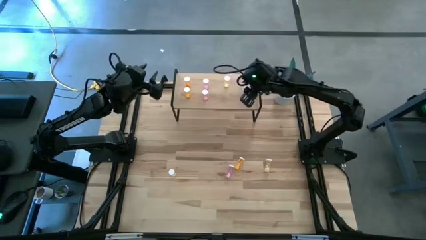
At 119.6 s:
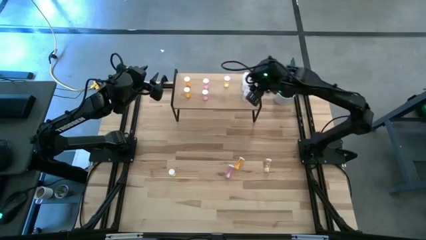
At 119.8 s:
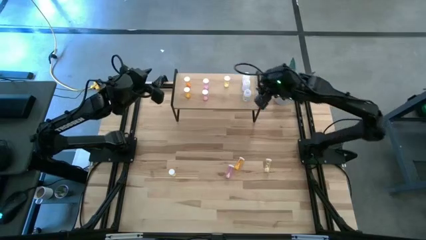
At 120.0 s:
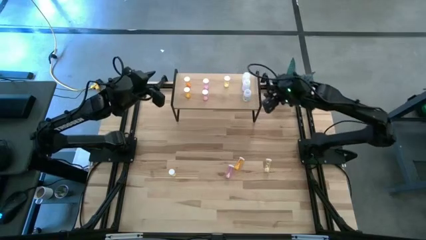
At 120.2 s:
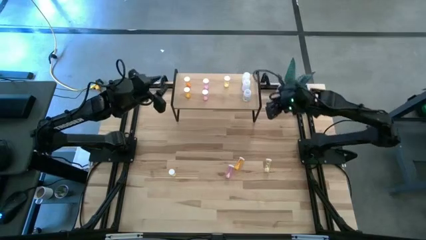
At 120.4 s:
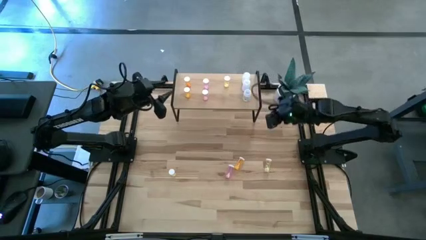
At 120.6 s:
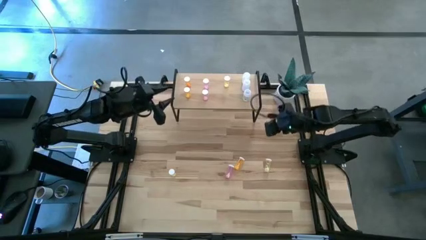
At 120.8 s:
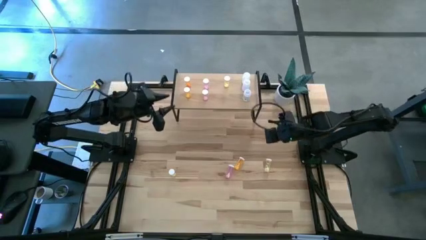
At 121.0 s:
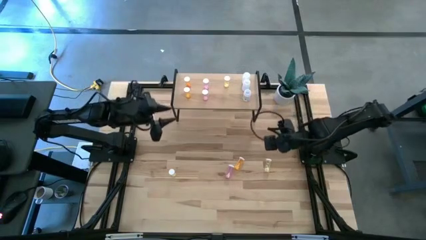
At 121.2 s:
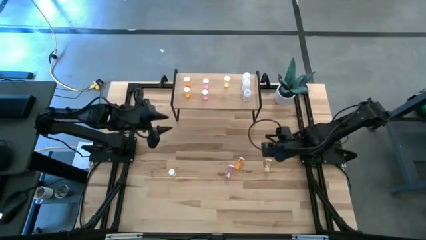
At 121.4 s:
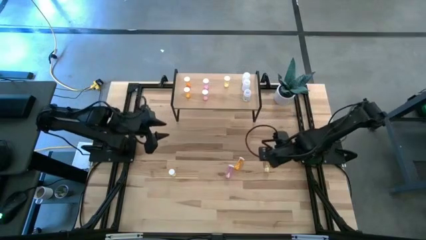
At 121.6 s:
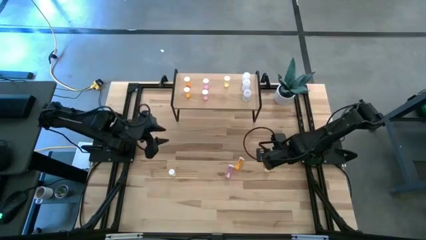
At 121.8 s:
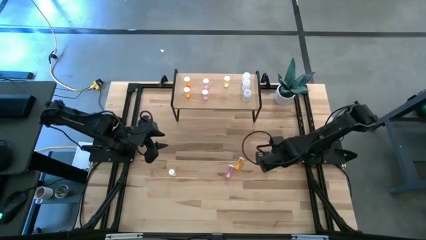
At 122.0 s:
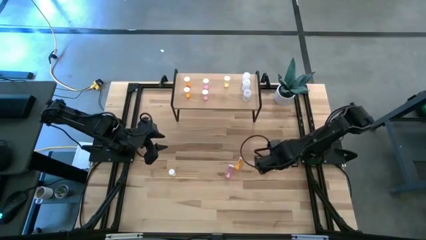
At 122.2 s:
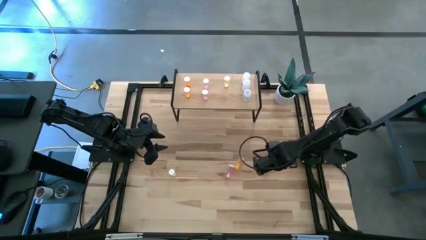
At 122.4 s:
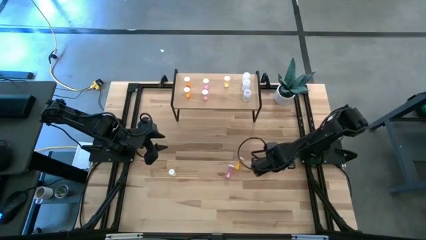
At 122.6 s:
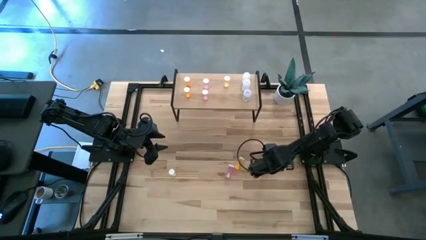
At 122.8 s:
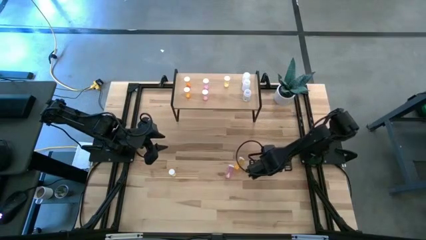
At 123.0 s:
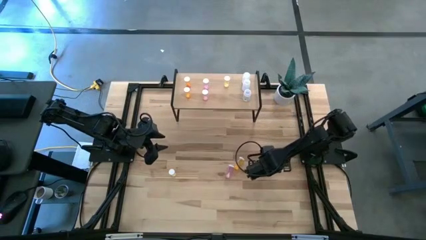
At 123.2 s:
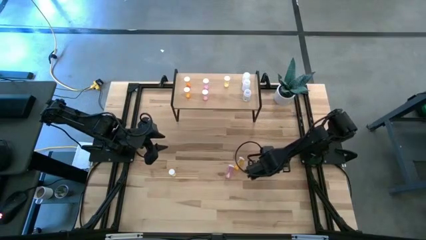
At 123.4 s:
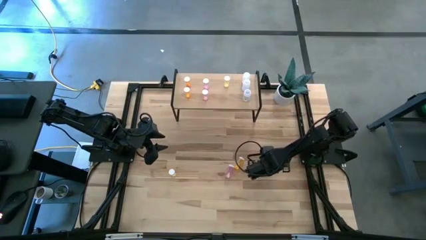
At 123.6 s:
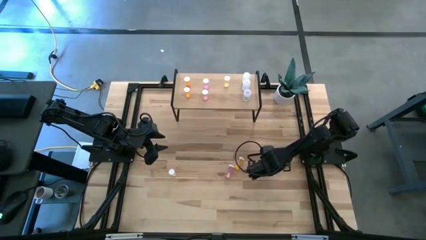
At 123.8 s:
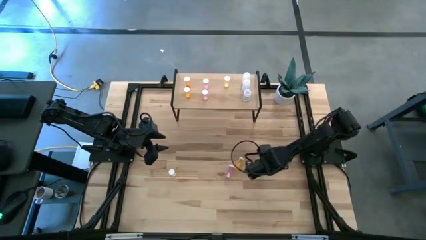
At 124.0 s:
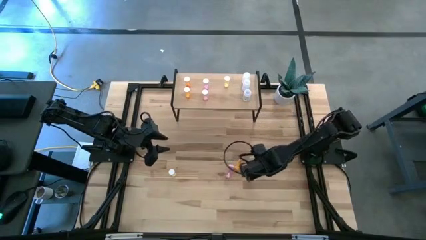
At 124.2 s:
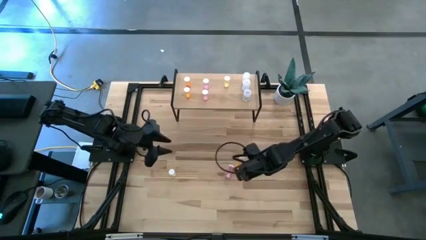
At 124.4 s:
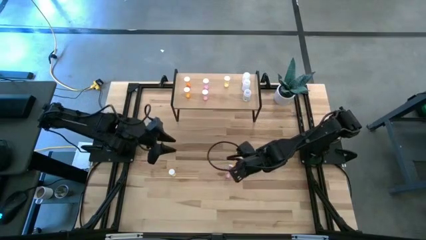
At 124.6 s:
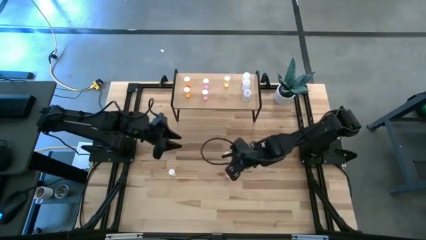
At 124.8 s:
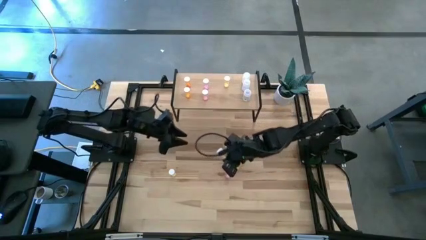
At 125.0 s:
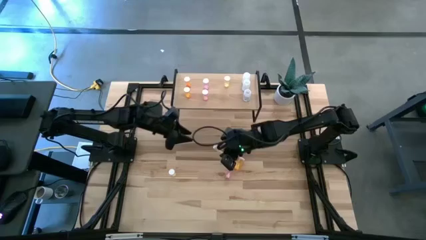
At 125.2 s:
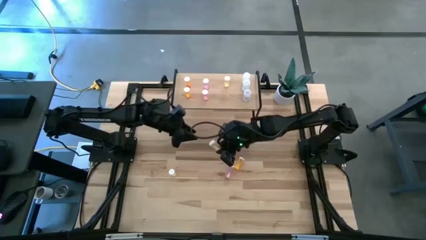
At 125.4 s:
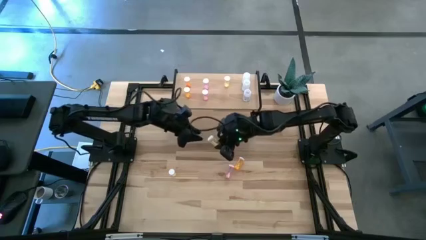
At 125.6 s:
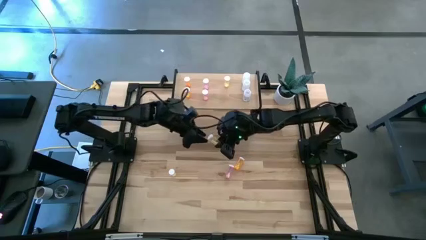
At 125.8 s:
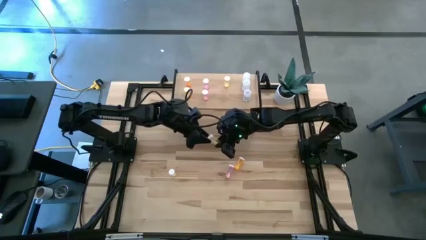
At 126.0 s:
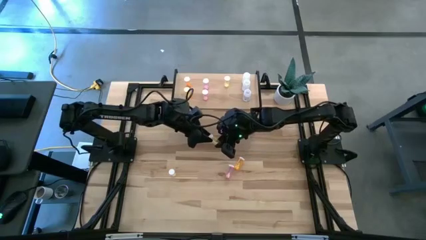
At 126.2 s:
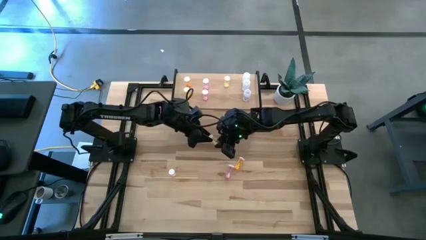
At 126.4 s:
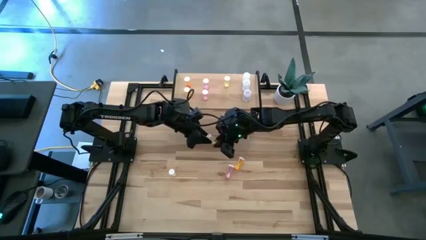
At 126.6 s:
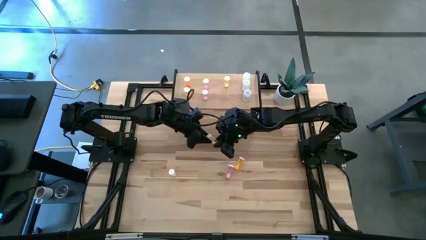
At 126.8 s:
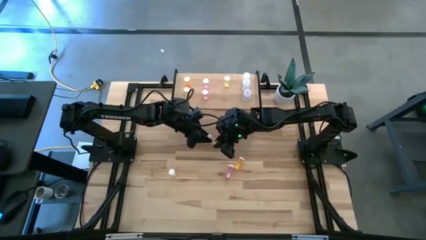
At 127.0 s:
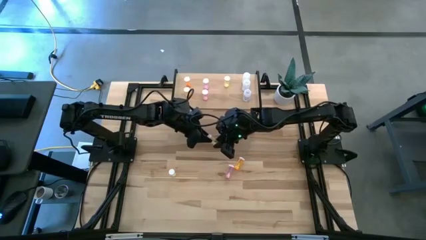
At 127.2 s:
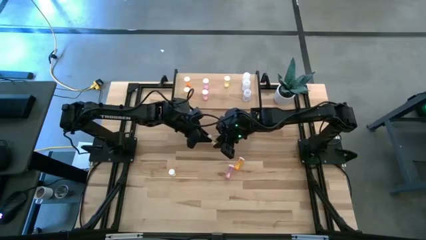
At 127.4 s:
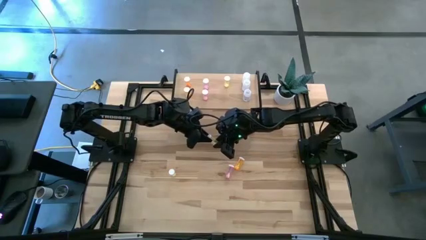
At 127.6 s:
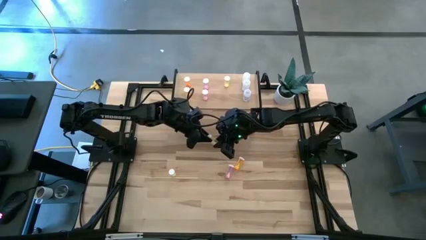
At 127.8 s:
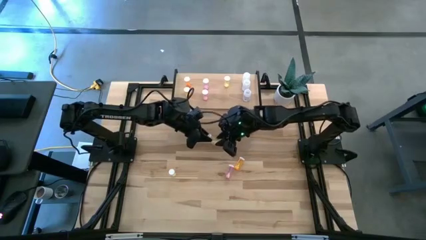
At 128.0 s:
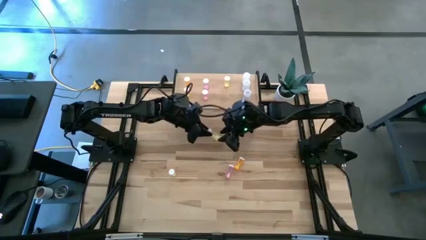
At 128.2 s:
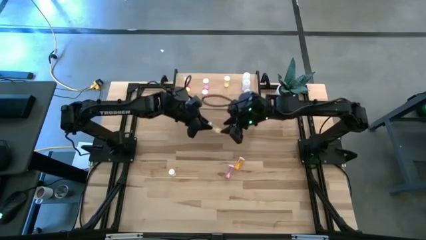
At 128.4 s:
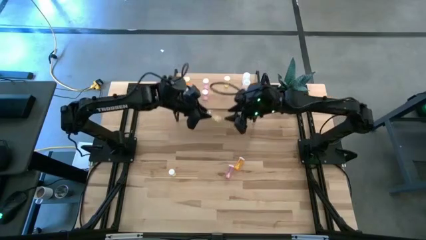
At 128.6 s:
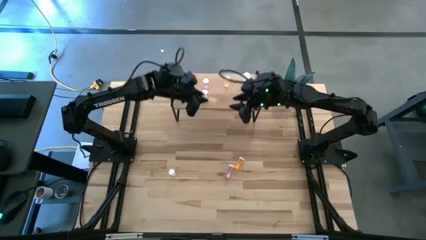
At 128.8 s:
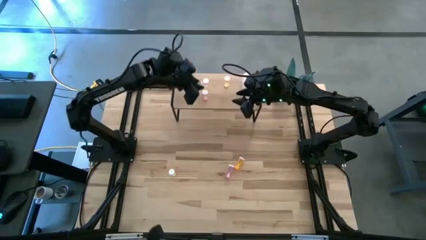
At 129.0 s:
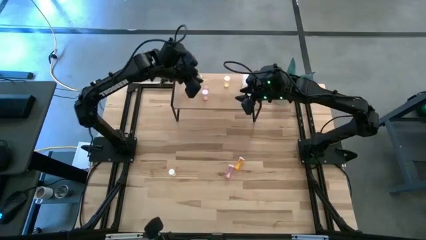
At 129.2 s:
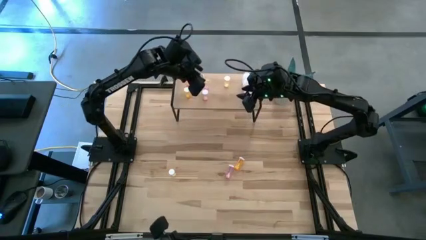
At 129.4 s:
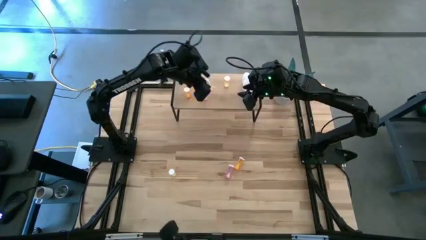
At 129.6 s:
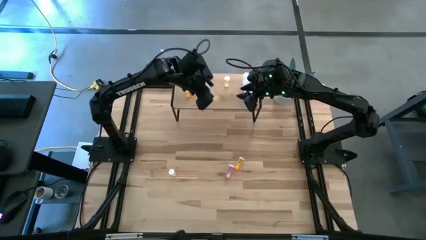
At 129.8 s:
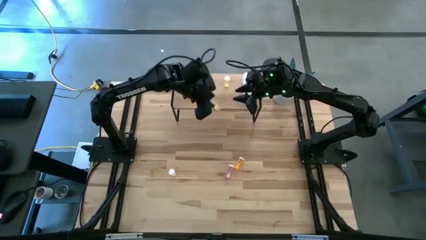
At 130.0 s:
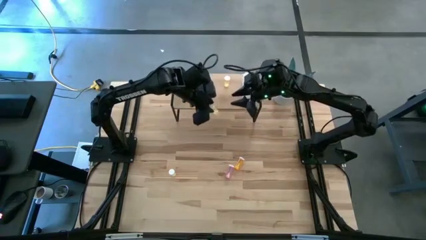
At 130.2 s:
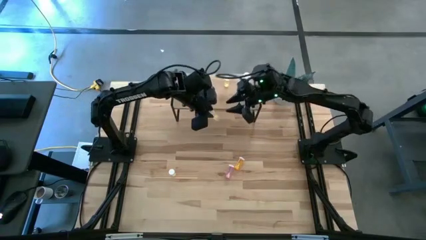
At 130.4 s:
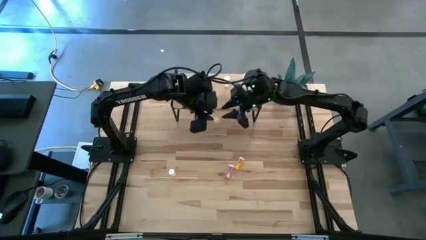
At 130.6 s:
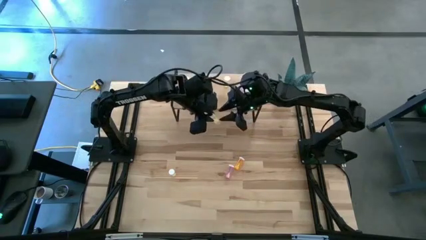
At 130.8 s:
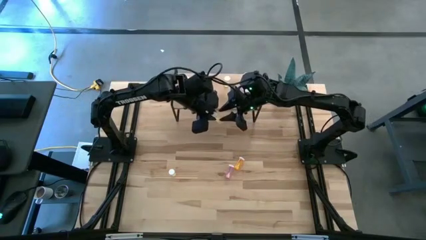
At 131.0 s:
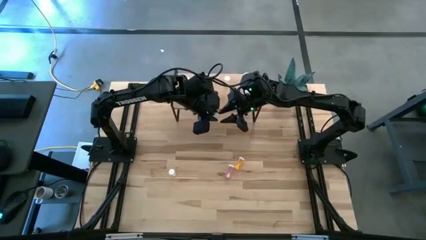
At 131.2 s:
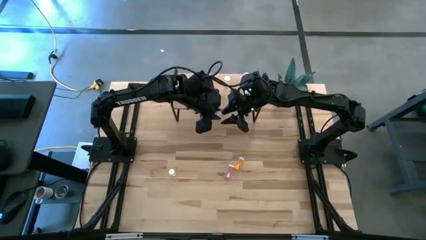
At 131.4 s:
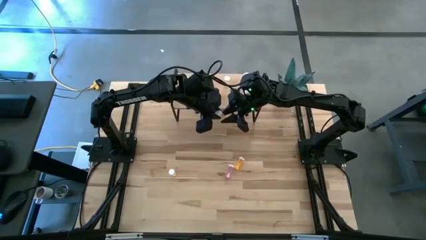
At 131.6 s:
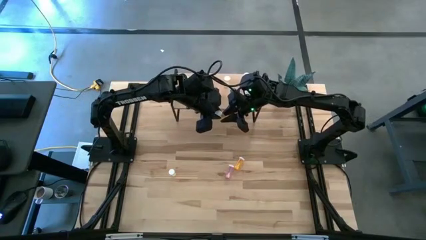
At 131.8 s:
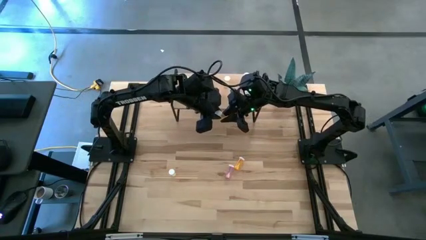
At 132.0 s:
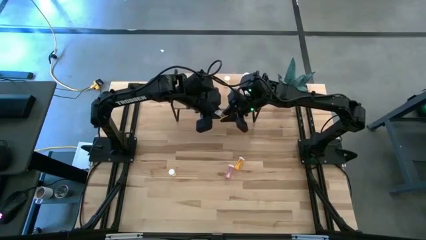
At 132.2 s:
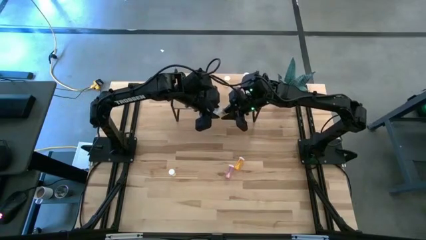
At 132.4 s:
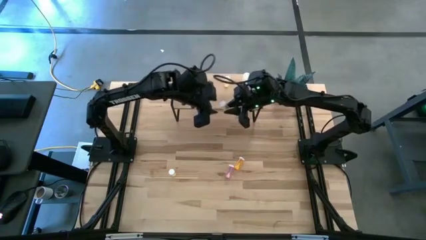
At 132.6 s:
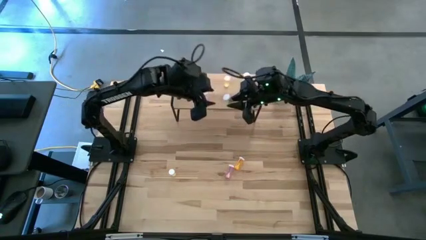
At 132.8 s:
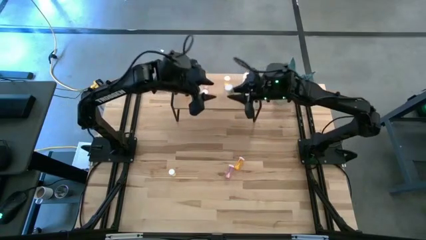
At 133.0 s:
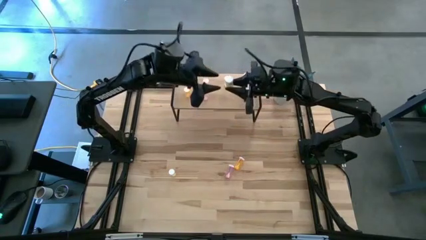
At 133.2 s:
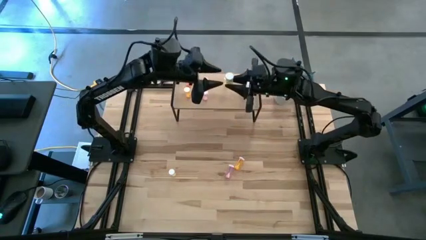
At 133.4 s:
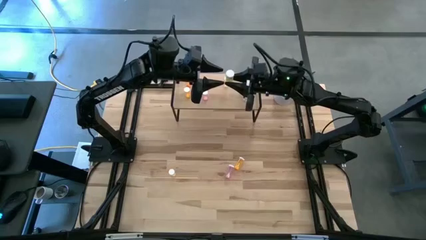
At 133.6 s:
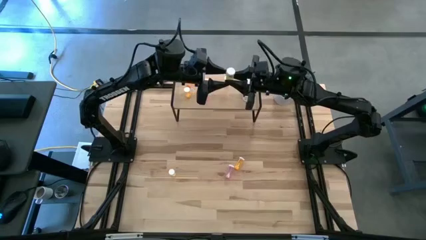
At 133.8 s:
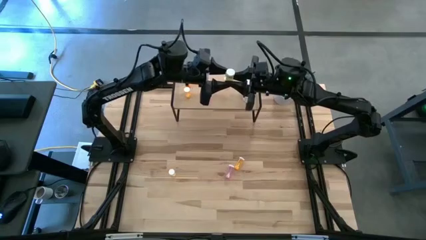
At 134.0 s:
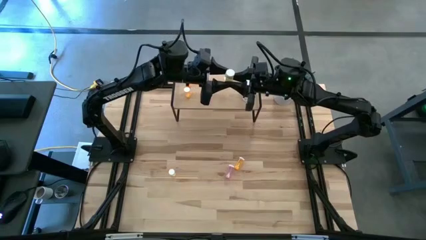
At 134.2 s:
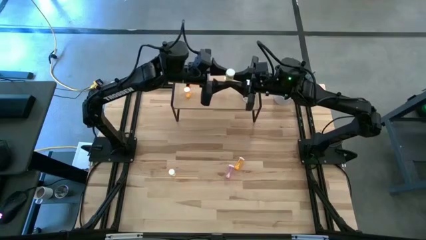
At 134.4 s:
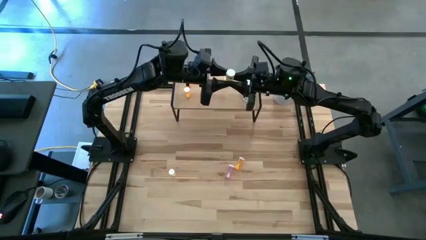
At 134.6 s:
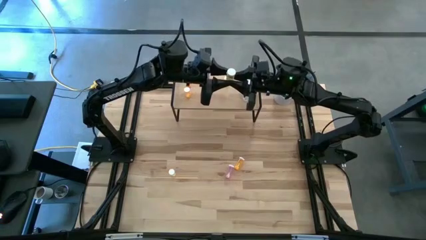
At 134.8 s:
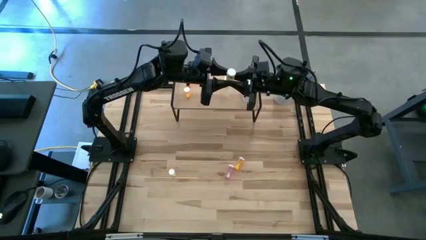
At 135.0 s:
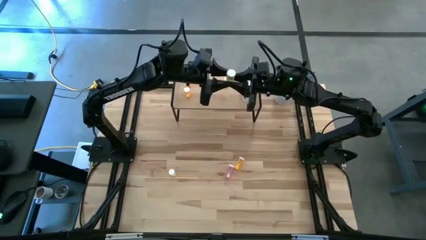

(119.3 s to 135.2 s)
Task: Pick and place medicine bottles onto shelf by color
Put the right yellow pill bottle on the shelf aligned with the other yellow pill bottle
